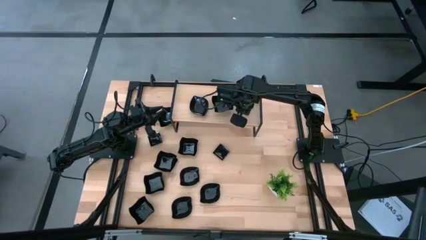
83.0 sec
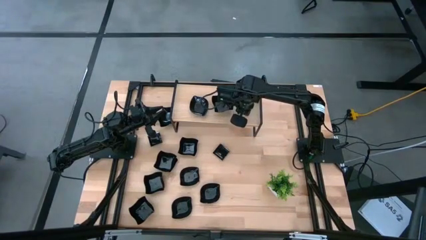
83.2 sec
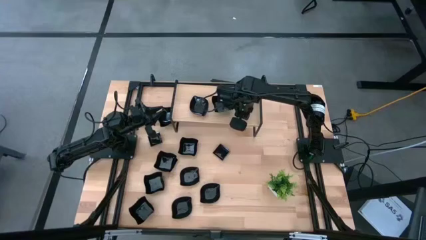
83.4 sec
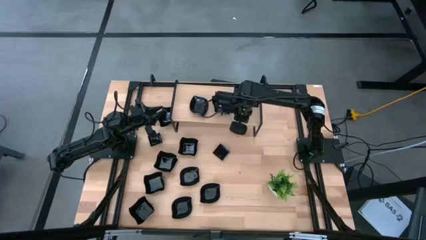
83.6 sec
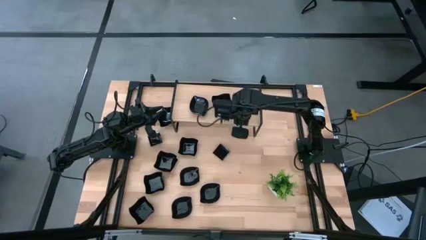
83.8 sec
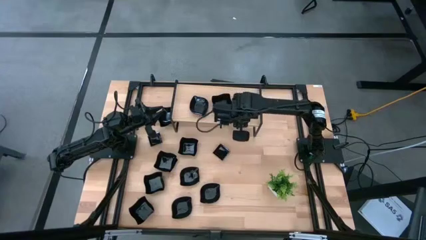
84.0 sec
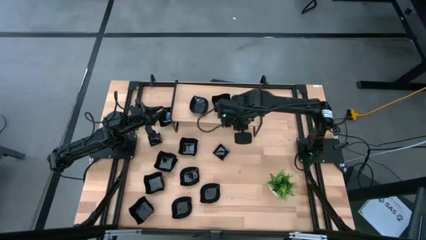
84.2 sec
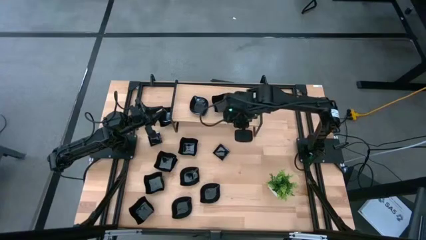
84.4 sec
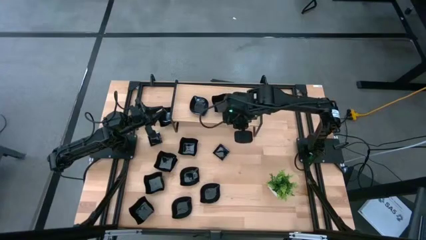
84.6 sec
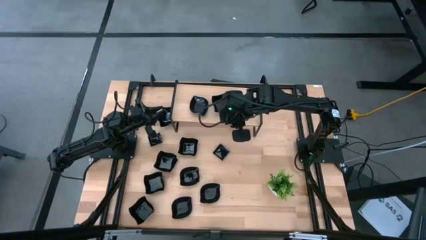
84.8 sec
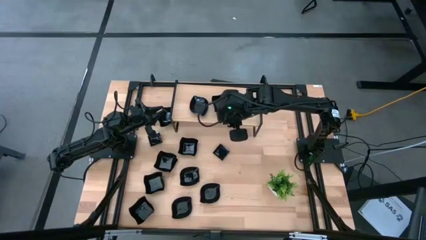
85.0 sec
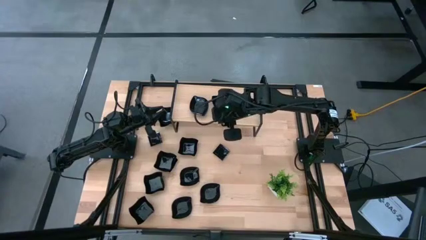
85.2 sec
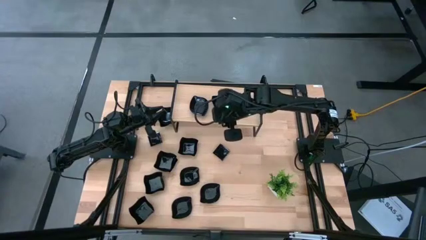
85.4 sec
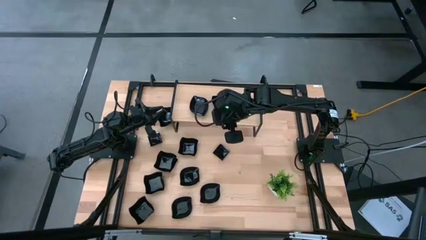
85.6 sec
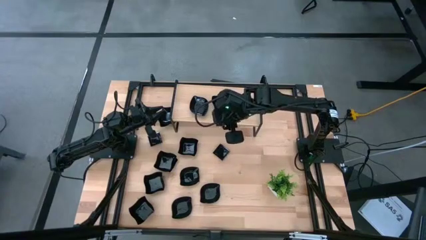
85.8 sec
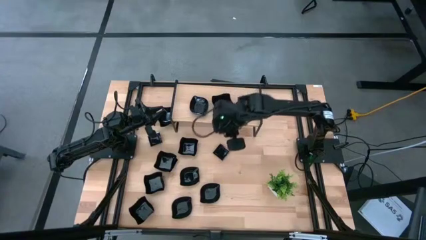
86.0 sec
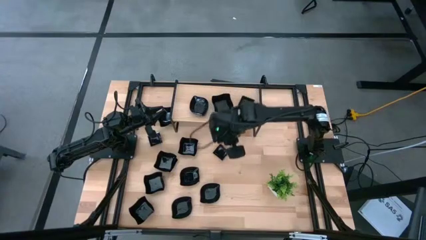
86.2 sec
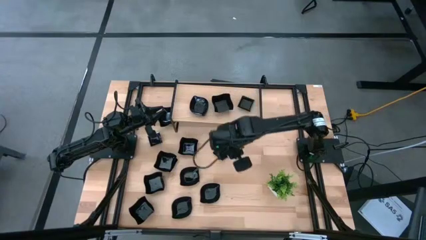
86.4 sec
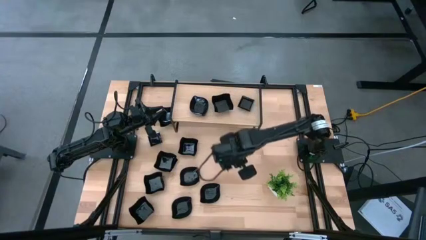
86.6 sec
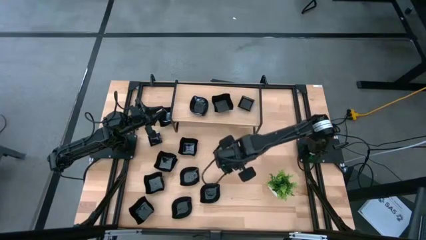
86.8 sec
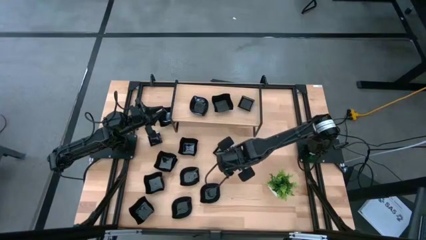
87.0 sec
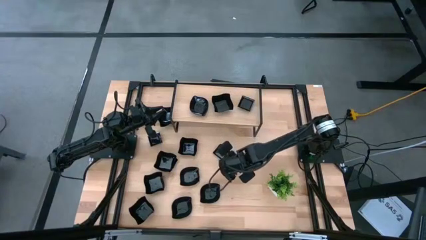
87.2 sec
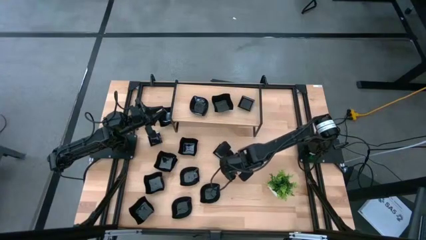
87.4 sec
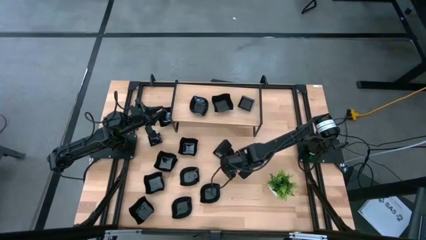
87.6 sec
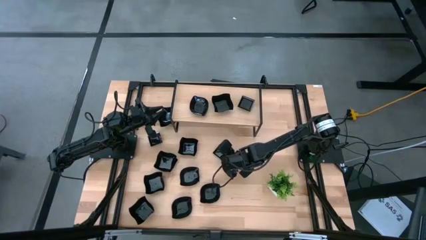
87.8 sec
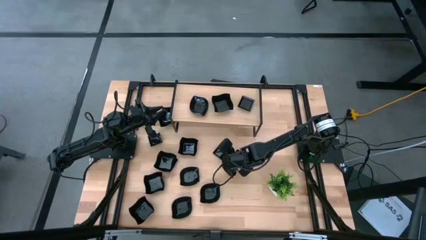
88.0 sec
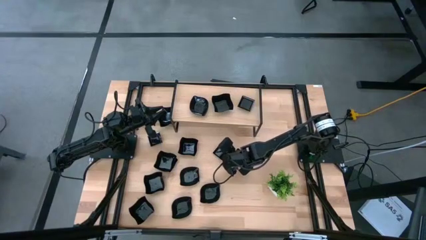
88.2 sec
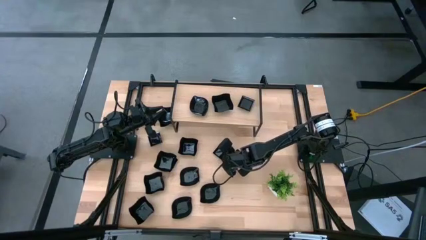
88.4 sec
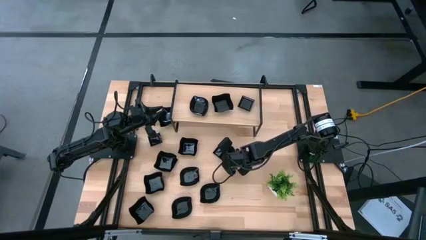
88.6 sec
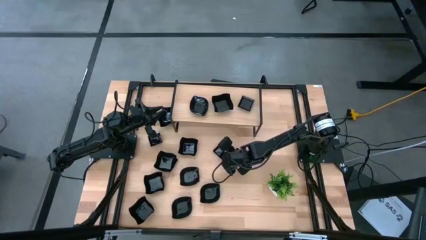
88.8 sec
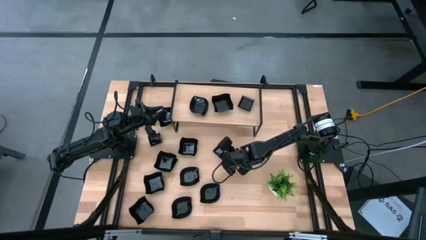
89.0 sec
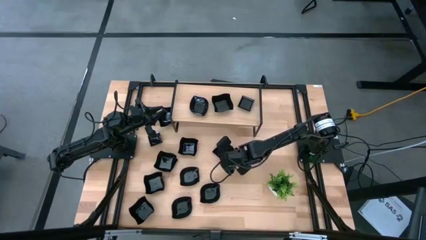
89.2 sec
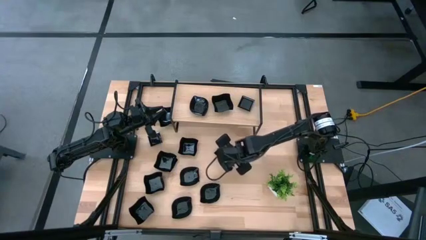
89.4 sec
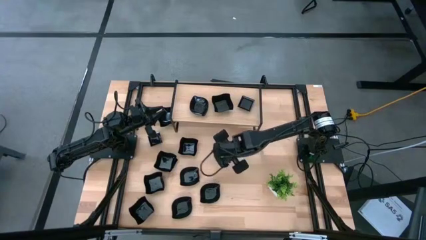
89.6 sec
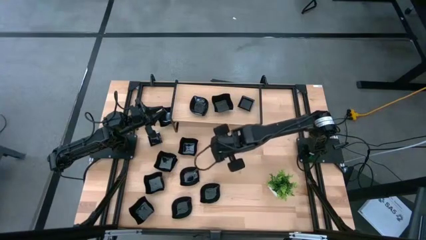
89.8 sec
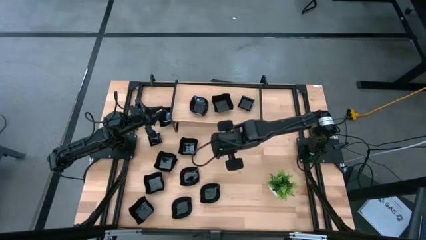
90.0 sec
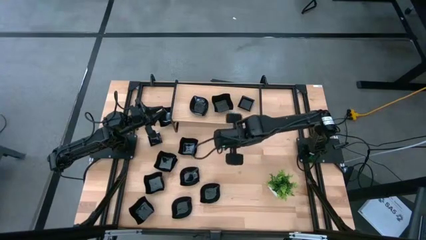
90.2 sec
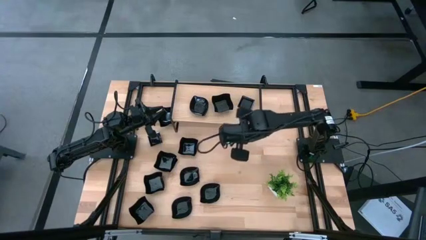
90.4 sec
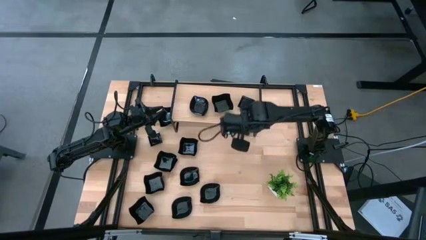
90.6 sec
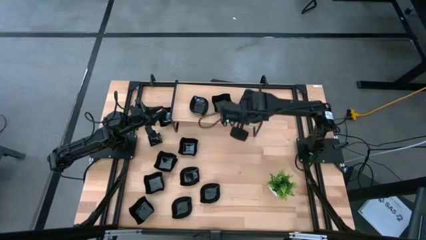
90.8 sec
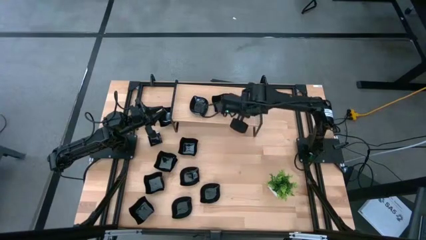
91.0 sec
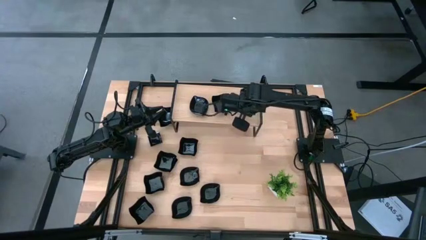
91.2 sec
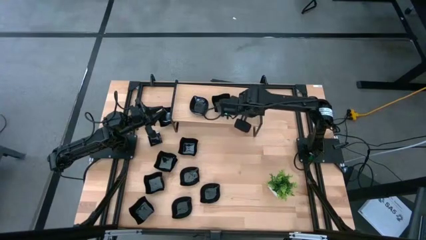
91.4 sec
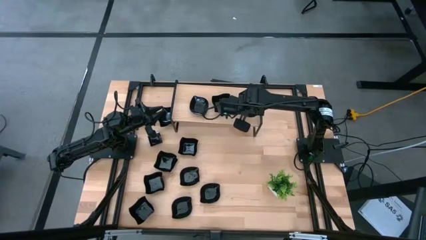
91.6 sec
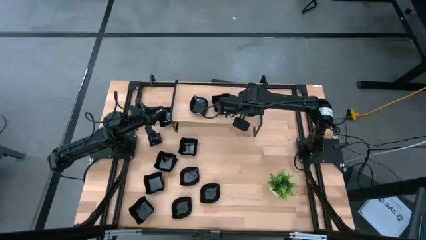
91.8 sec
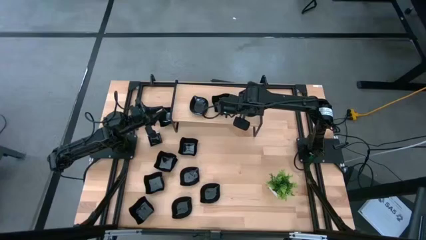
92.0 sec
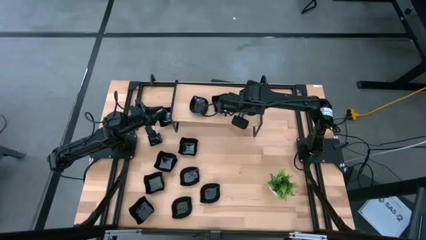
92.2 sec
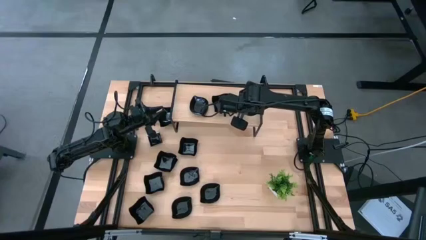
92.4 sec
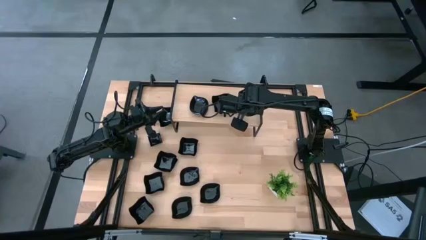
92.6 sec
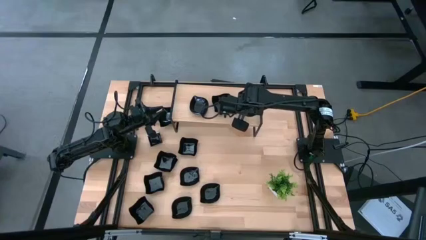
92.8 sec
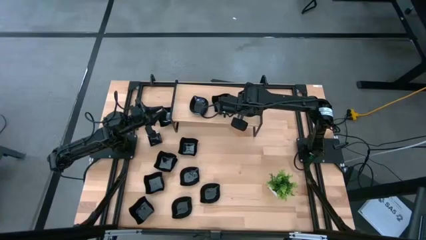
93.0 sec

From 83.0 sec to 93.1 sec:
Task: Pick & Place Mini shaped plates
Stack the square plate on top of the square plate on the shelf

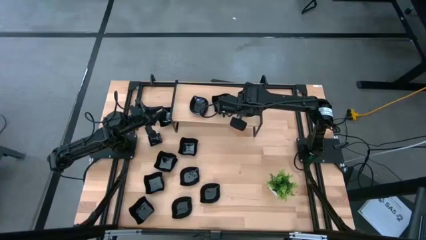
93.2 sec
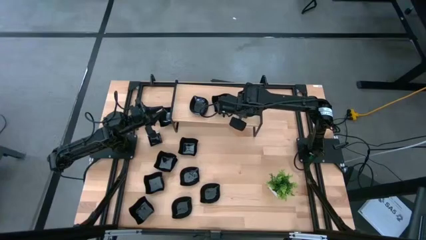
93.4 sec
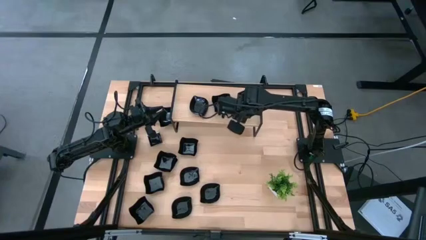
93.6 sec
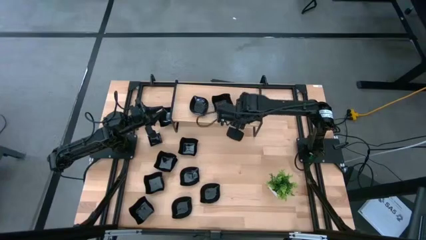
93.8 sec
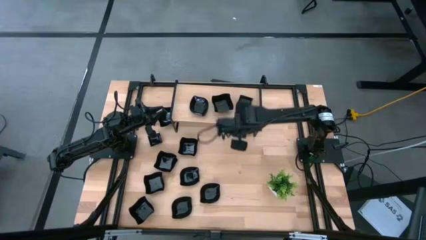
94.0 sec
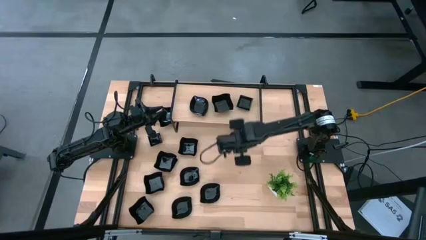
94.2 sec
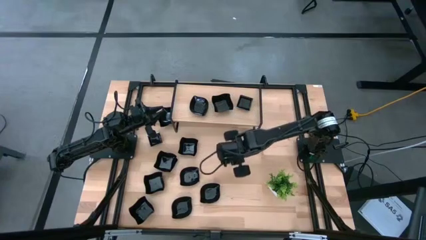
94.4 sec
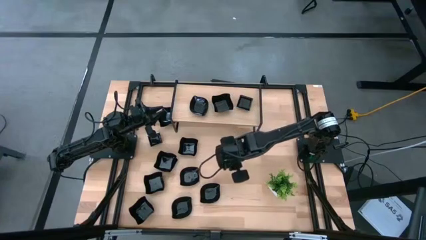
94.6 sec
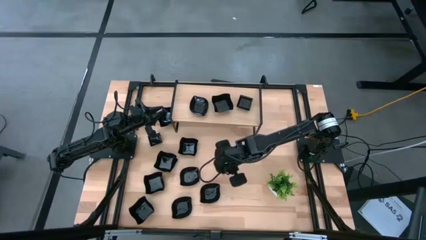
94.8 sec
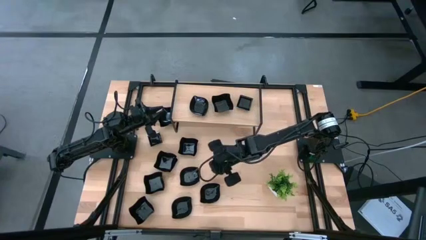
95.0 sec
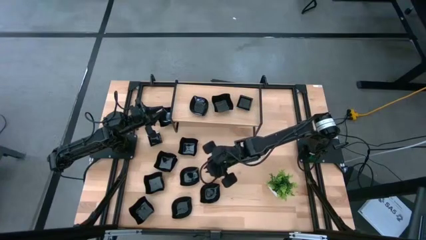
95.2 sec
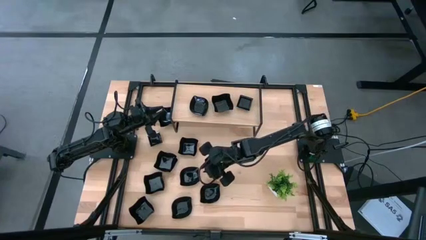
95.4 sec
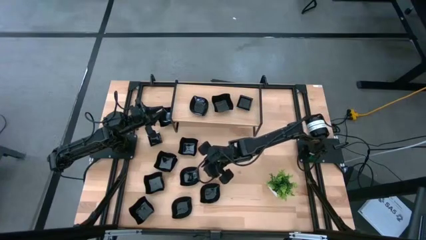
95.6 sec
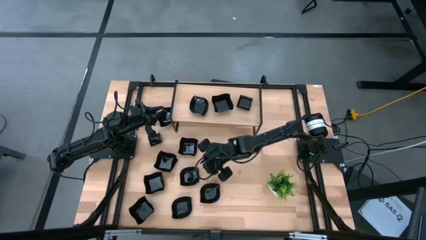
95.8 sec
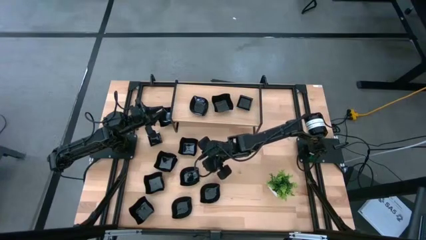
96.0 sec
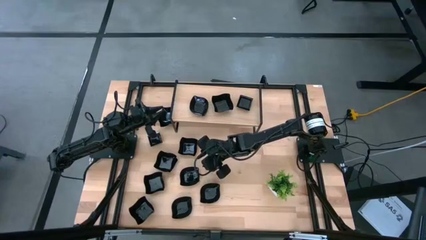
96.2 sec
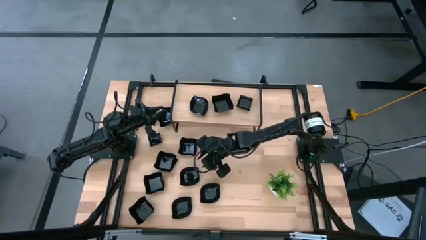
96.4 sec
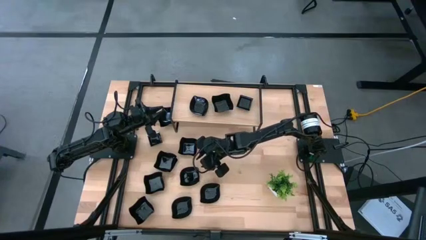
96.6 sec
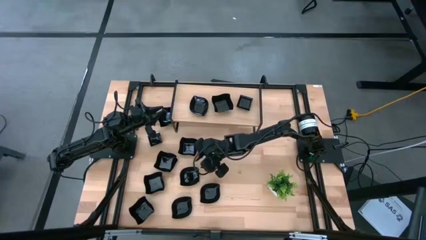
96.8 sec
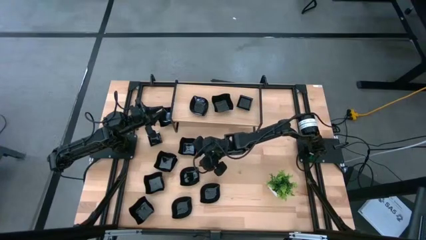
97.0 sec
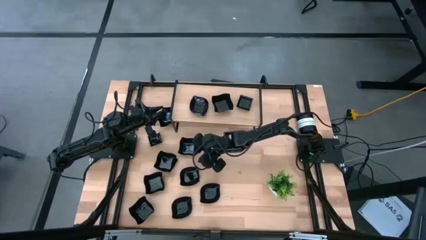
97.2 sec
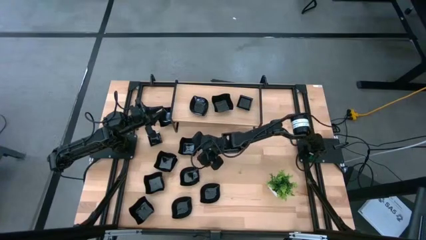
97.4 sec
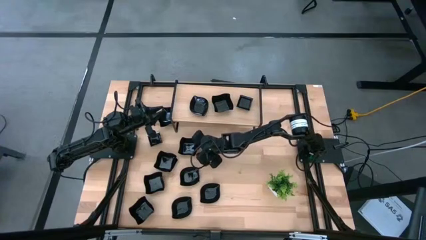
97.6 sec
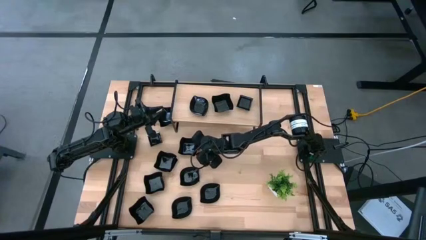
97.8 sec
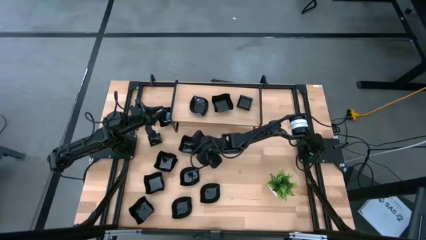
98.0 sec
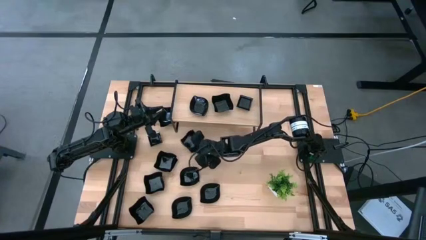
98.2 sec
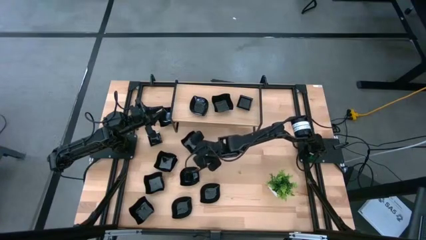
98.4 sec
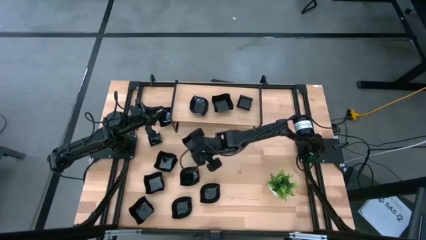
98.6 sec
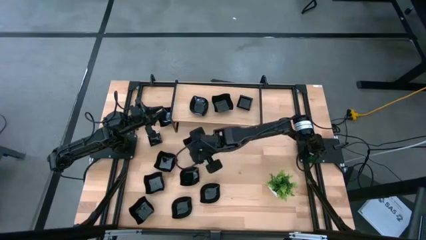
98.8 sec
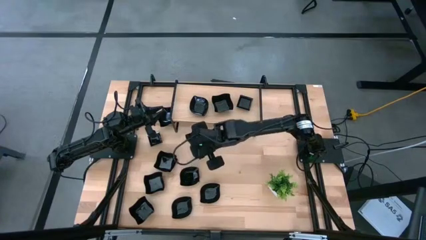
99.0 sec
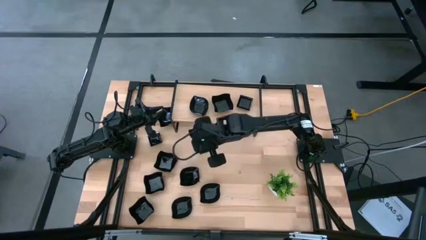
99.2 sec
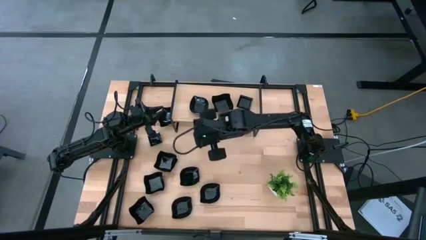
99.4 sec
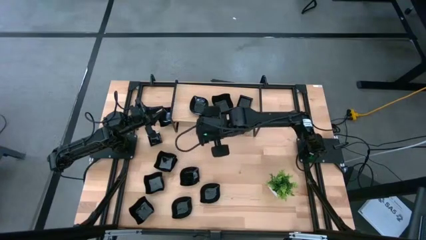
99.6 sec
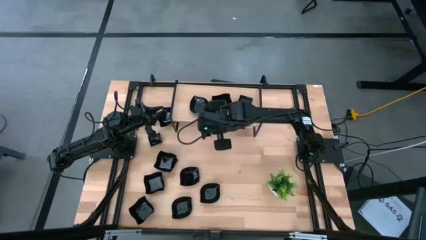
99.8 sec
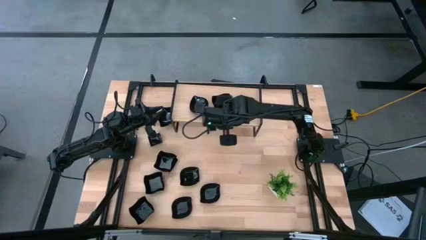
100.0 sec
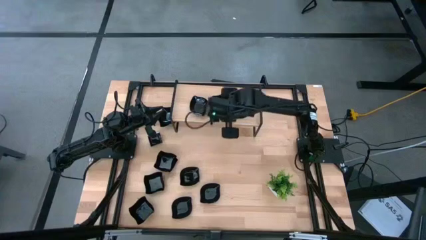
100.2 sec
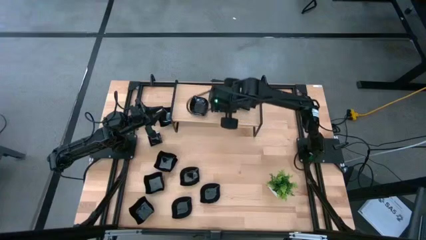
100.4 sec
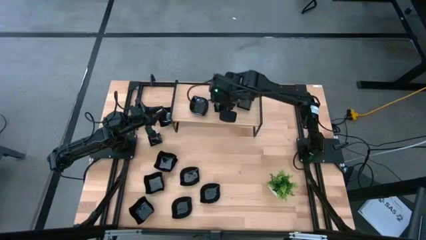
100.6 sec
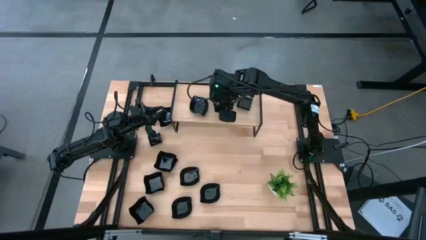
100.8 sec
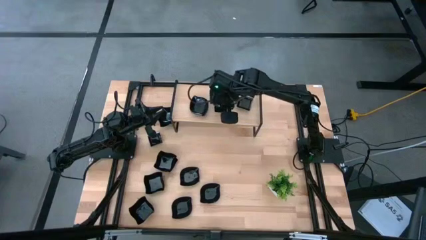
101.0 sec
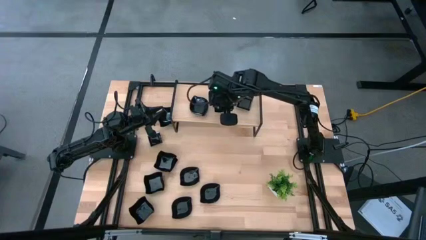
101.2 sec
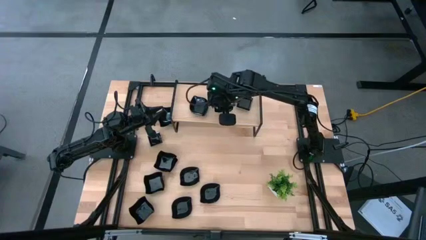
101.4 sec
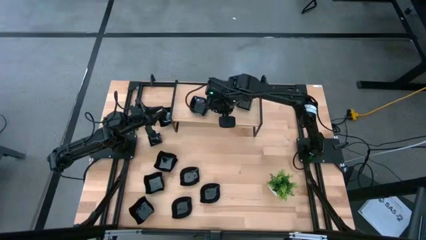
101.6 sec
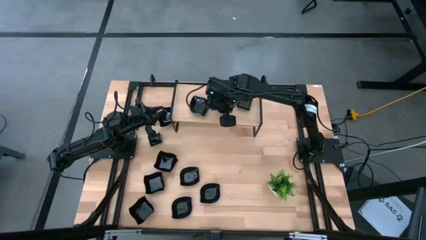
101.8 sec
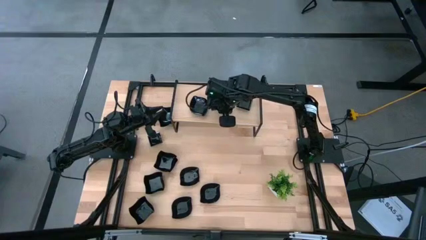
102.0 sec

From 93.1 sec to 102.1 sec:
Stack the distorted square plate on top of the distorted square plate on the shelf
